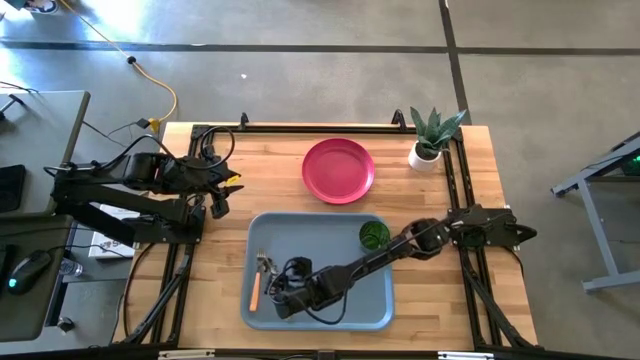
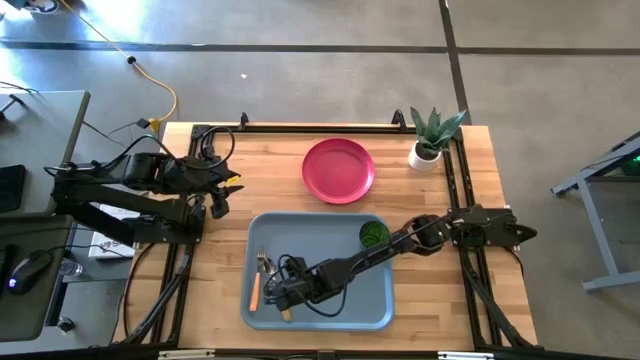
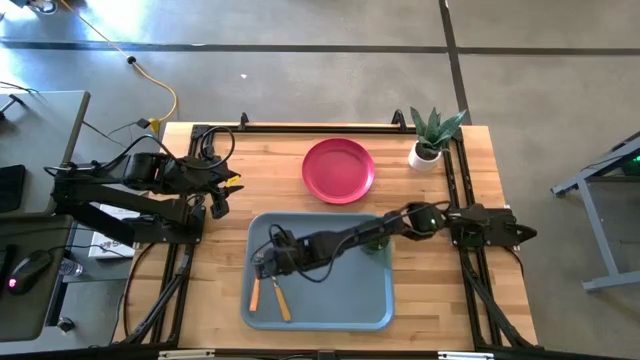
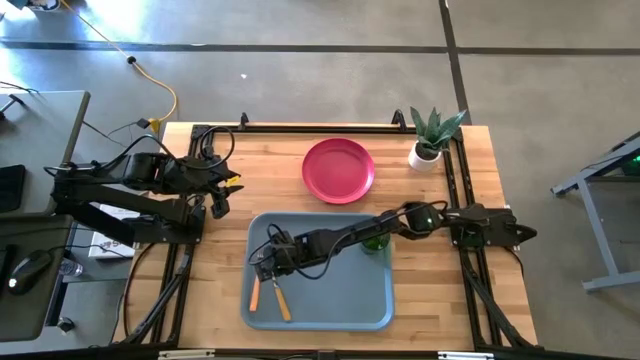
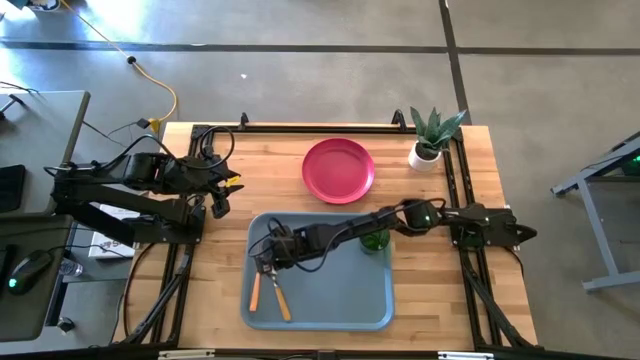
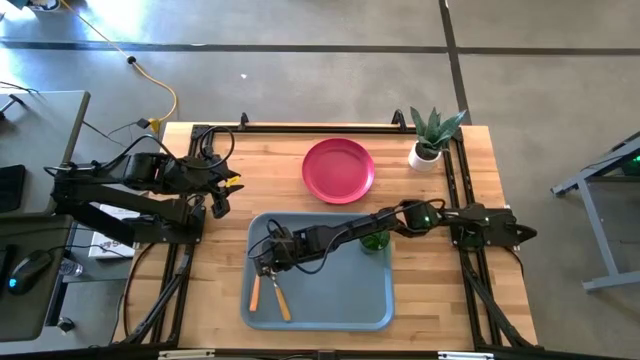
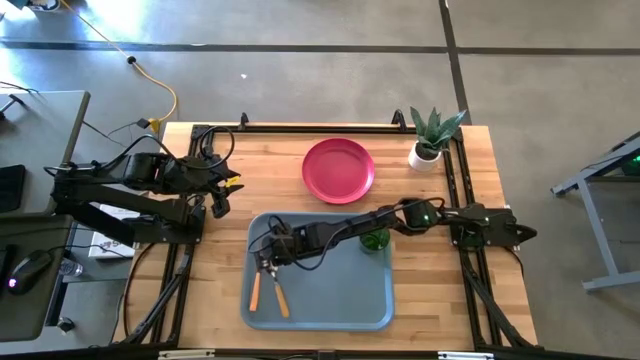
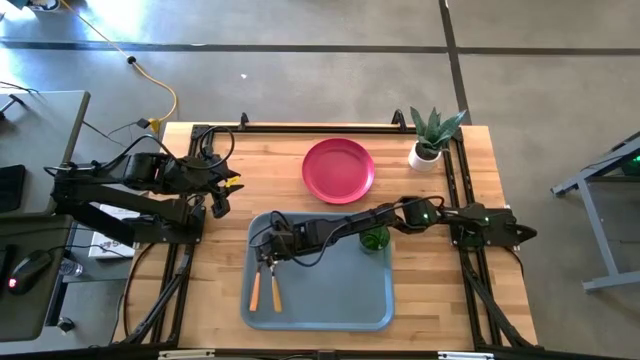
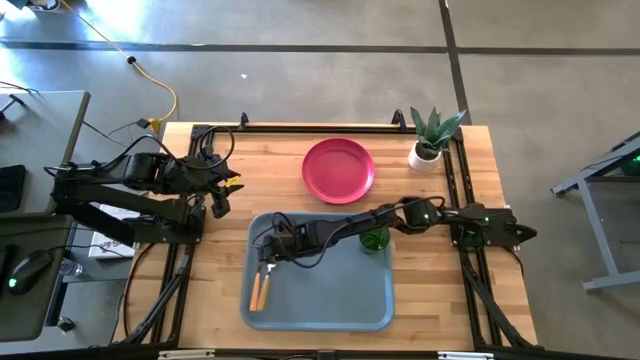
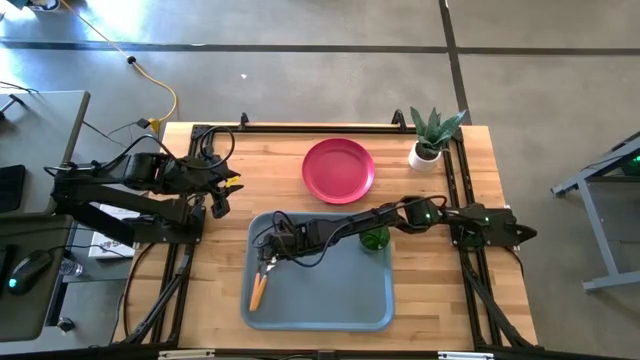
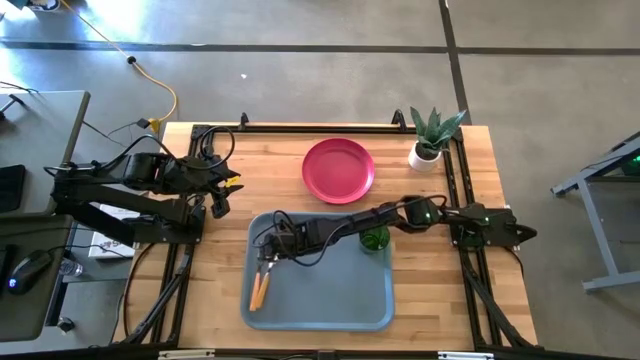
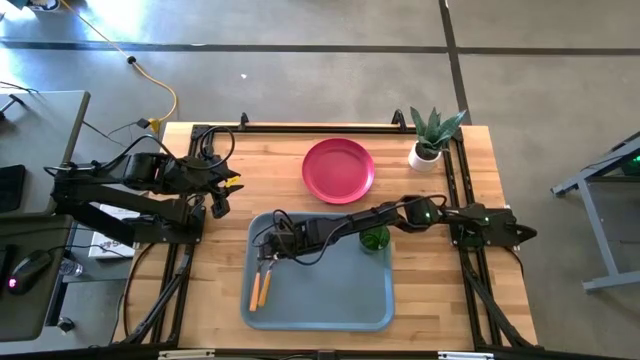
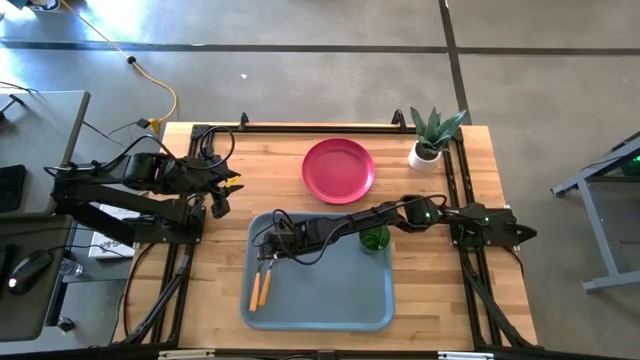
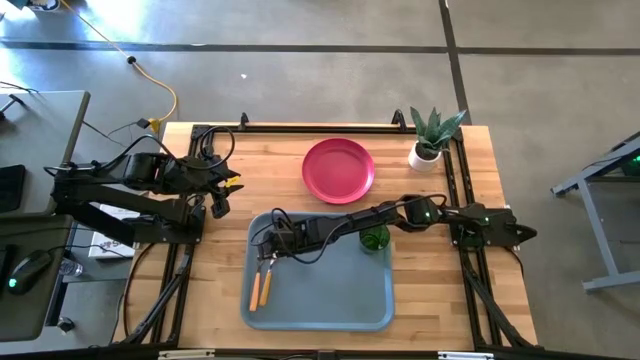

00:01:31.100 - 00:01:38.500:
Task: Pick and place plate/cup/fork/spoon on tray
Put the yellow spoon on the blue serving tray to the right of the orange fork

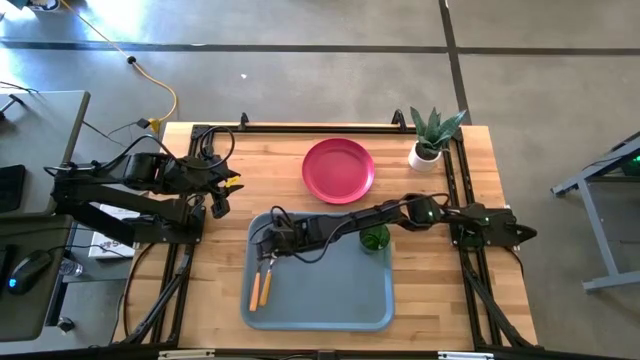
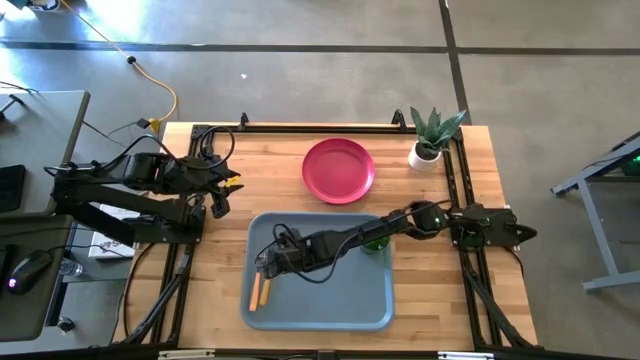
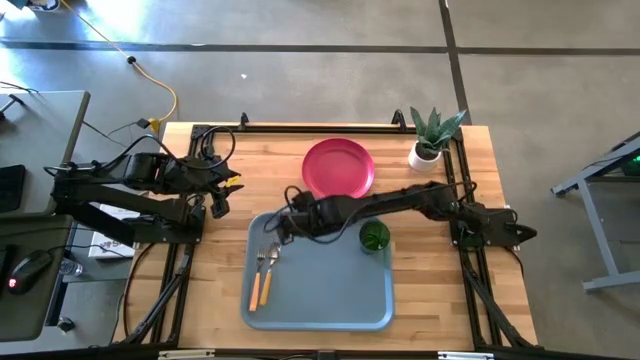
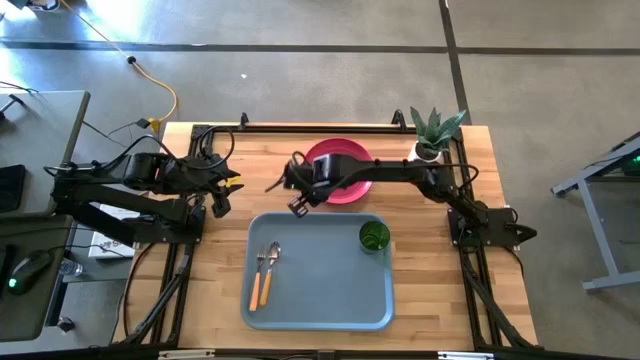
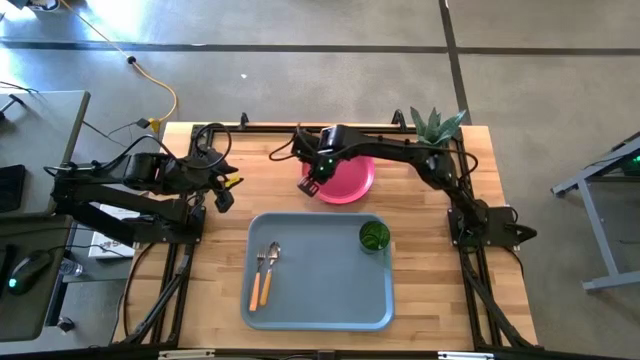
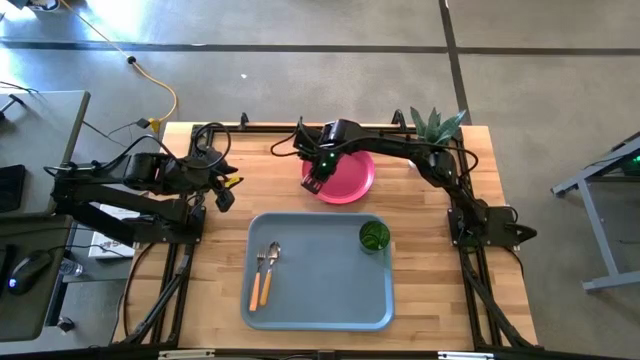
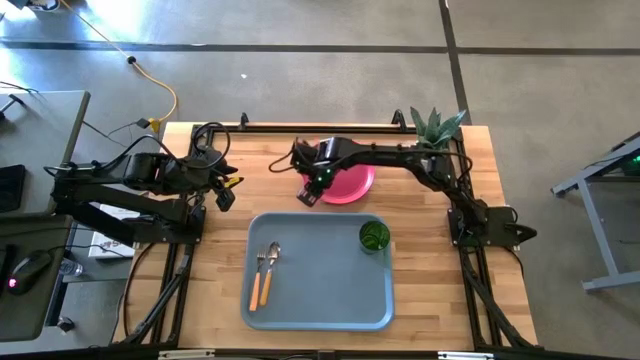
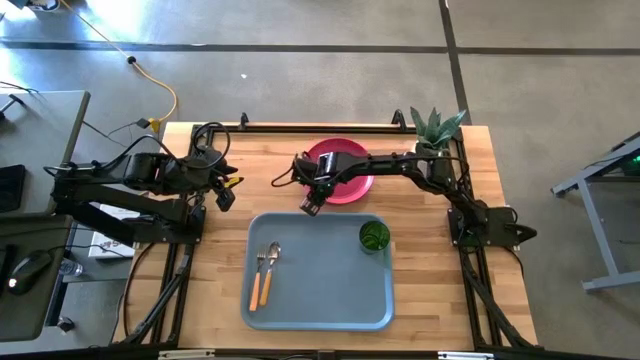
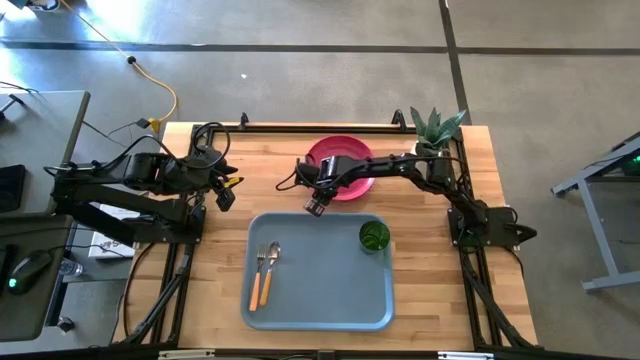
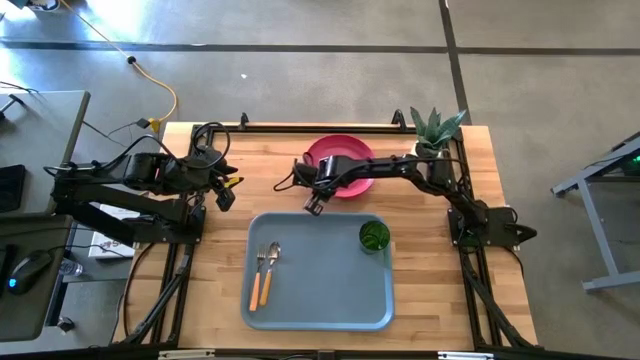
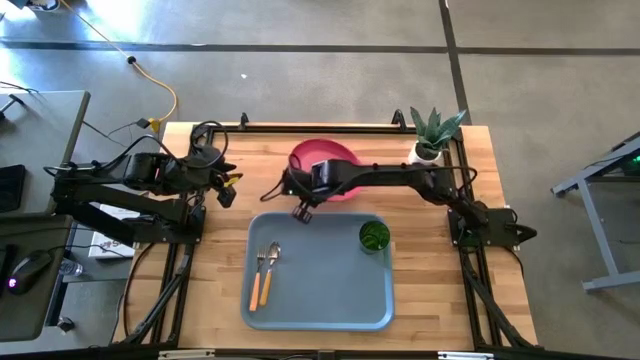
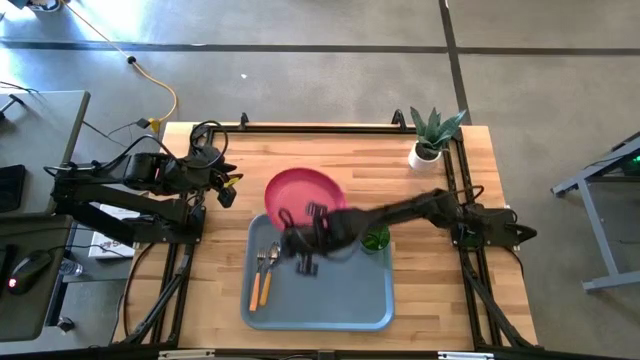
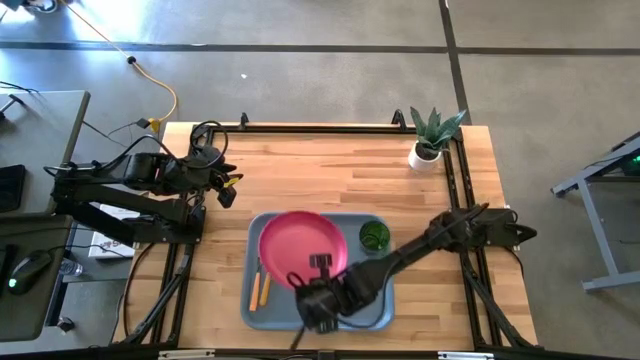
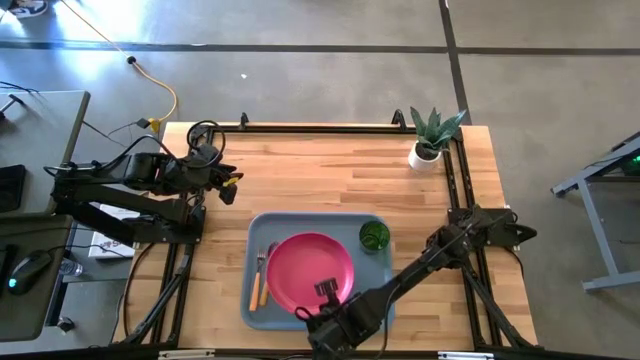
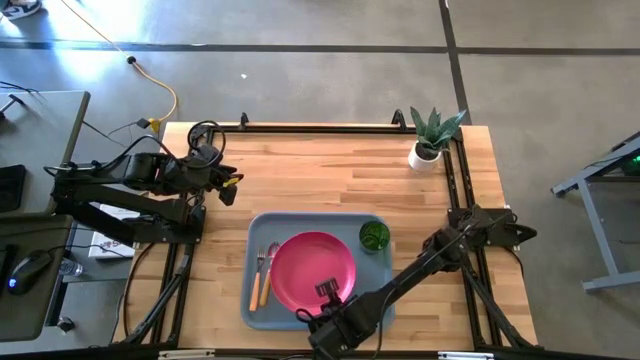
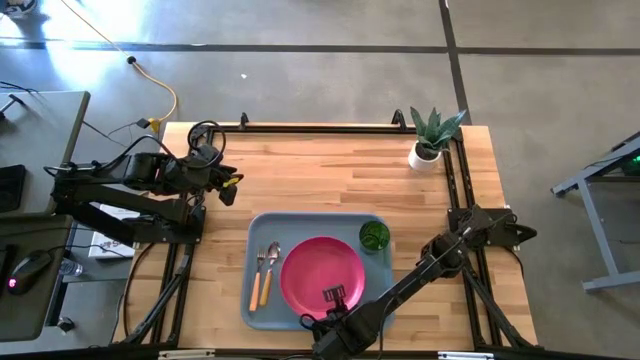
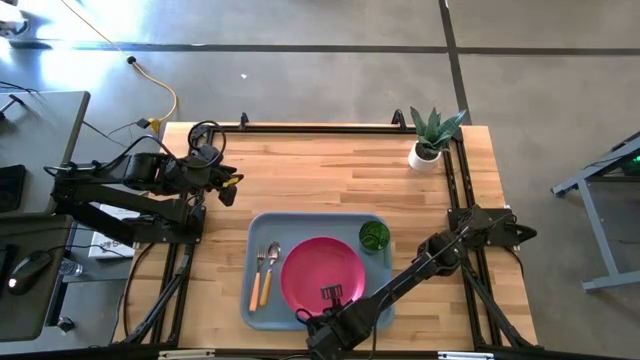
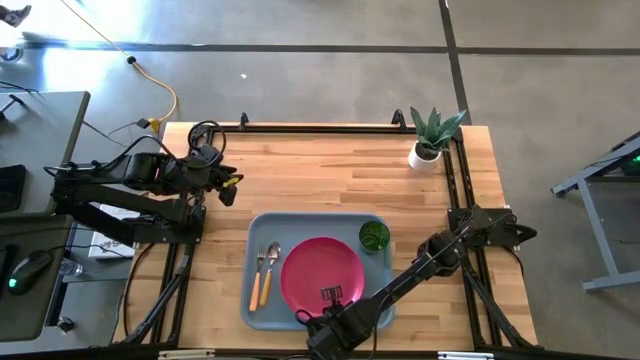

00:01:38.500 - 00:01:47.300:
Put the pink plate on the blue serving tray to the right of the yellow spoon

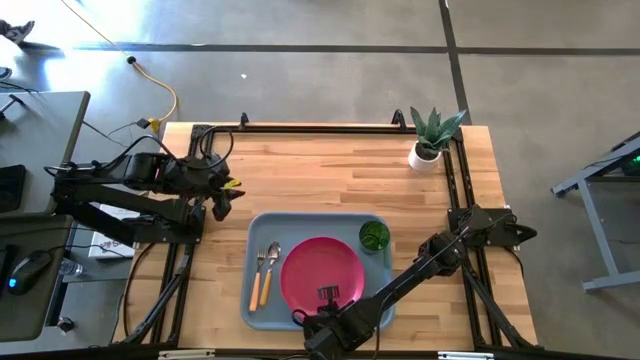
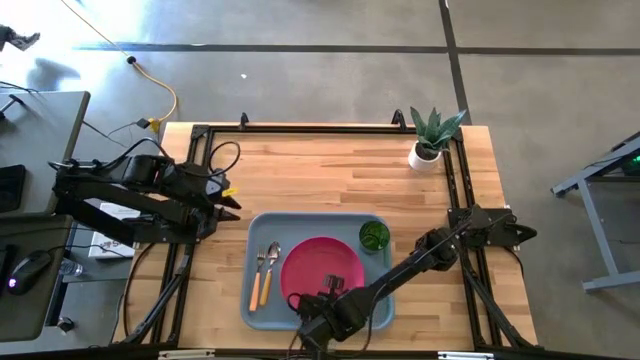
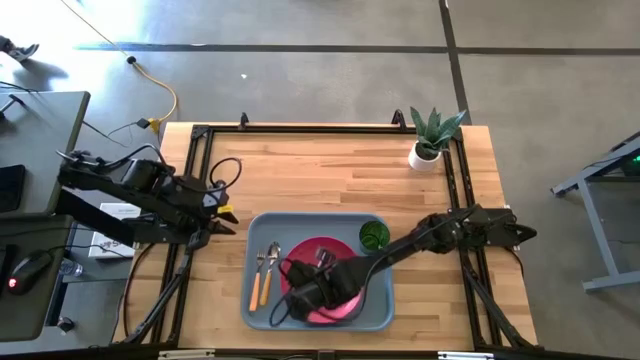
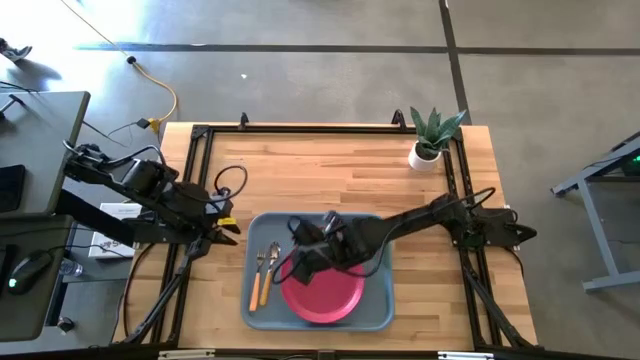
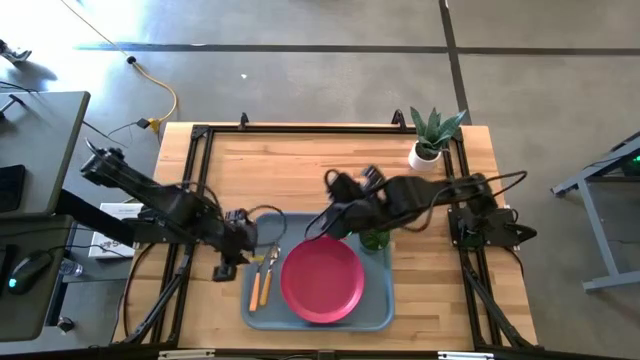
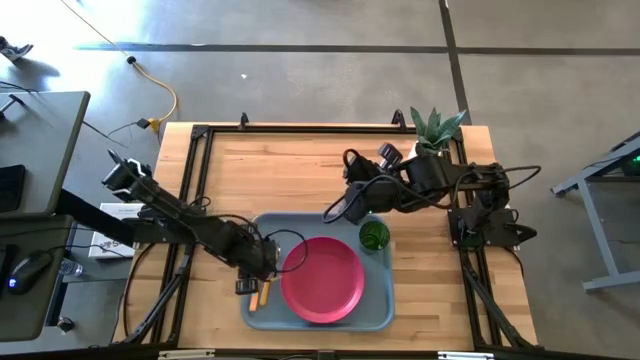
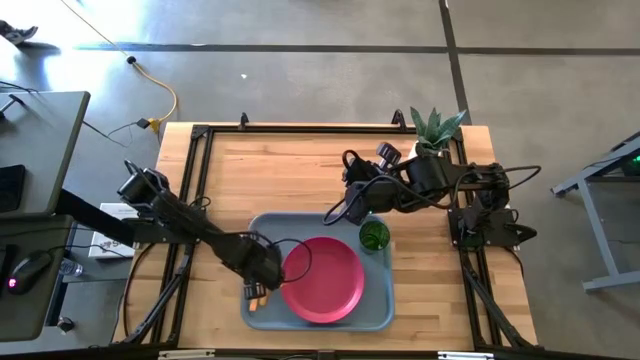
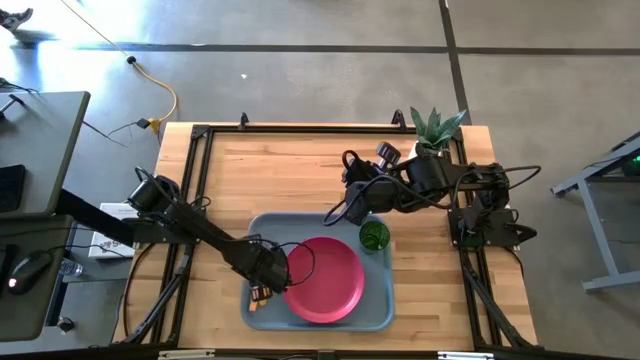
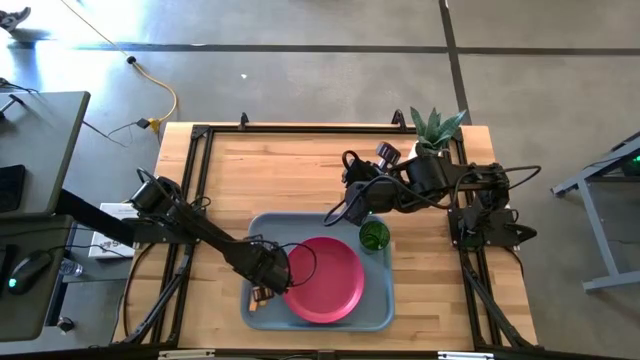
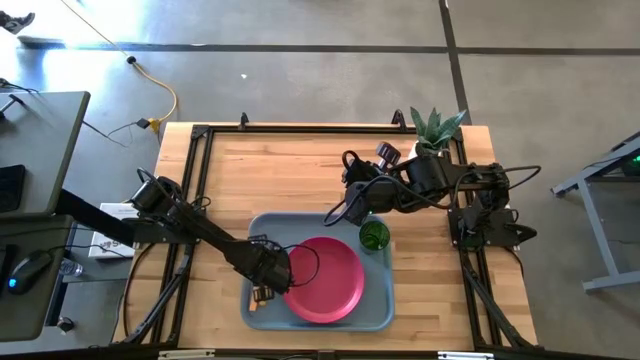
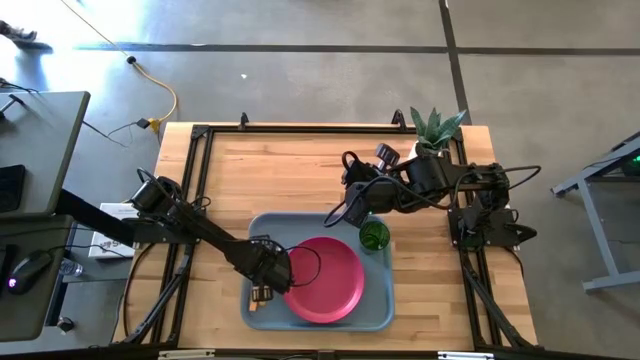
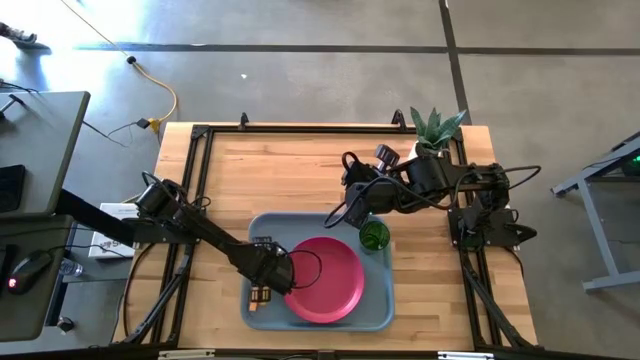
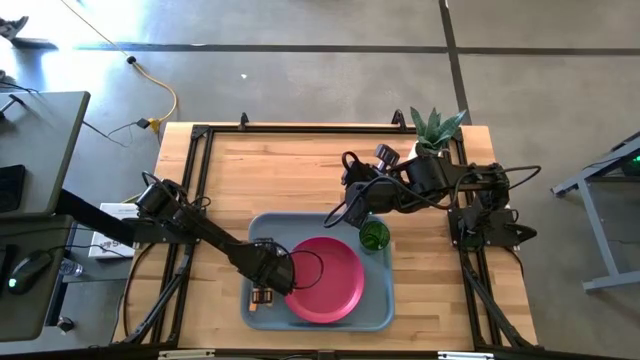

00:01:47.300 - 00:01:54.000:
Adjust the yellow spoon on the blue serving tray
